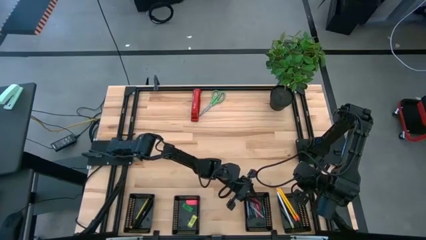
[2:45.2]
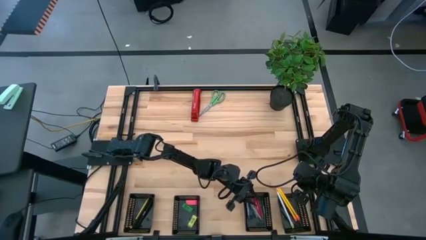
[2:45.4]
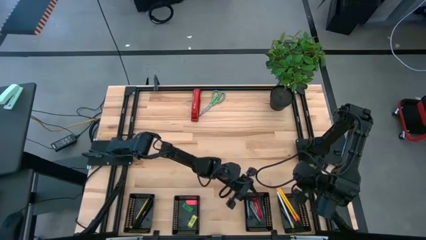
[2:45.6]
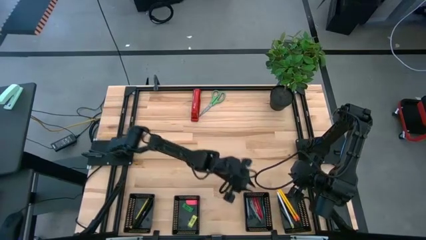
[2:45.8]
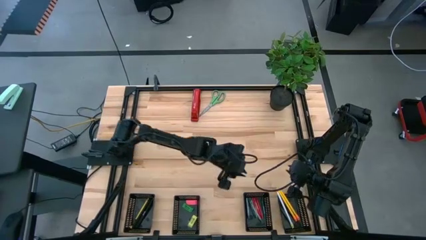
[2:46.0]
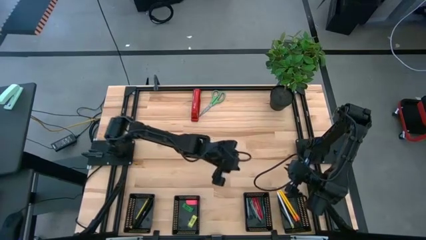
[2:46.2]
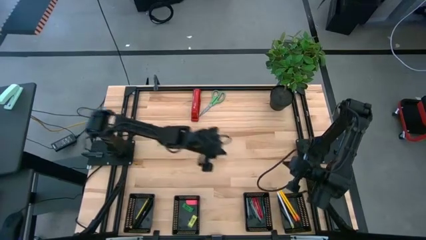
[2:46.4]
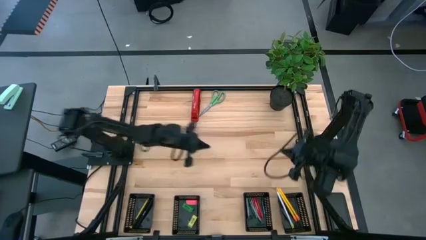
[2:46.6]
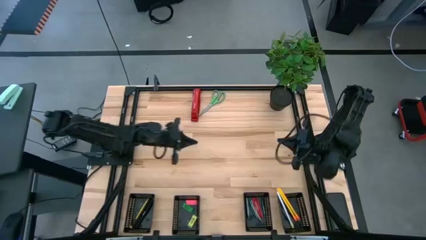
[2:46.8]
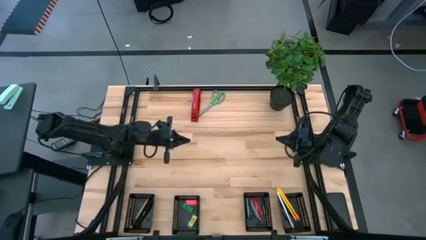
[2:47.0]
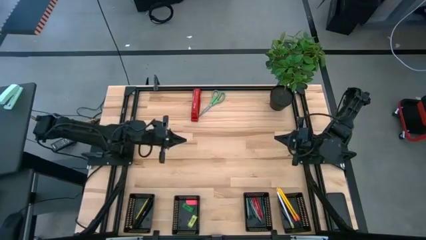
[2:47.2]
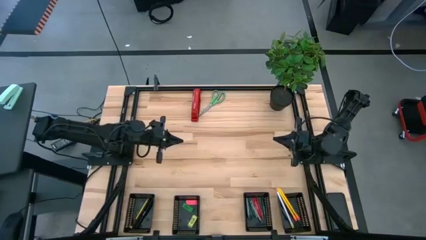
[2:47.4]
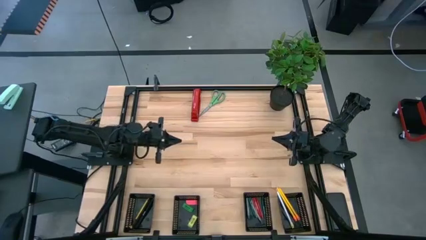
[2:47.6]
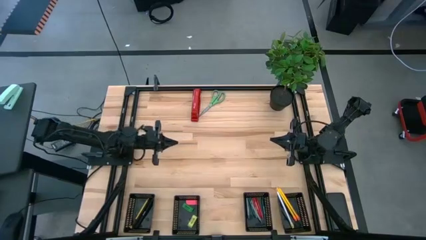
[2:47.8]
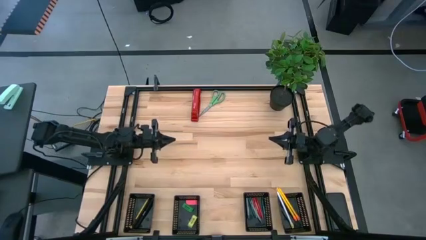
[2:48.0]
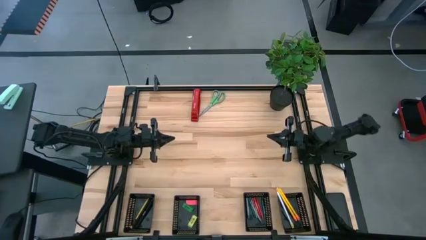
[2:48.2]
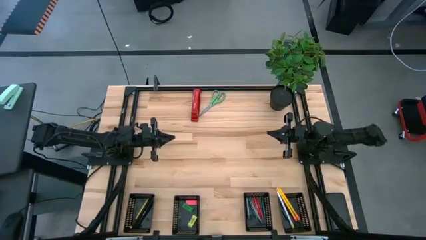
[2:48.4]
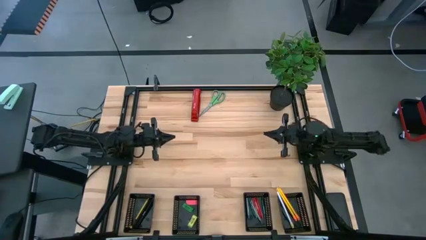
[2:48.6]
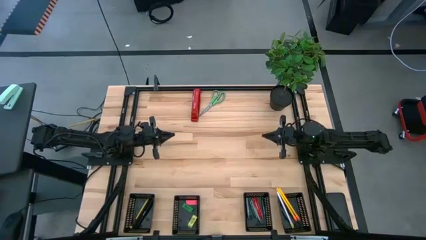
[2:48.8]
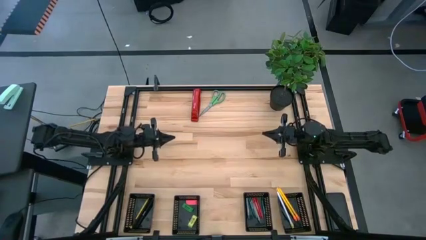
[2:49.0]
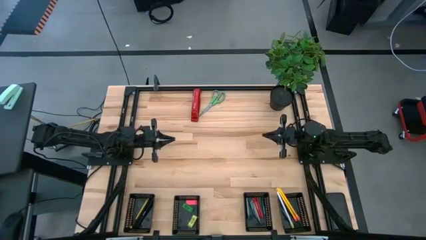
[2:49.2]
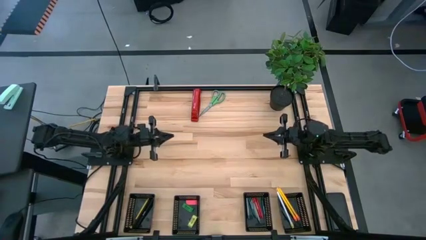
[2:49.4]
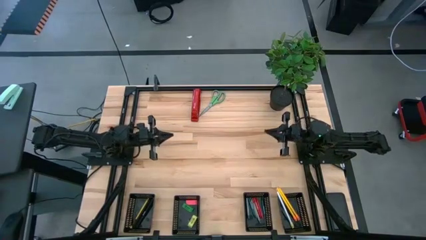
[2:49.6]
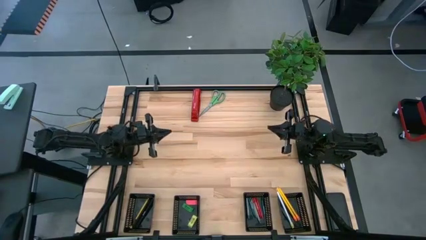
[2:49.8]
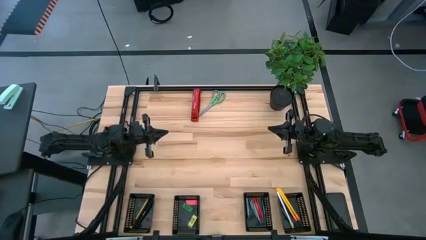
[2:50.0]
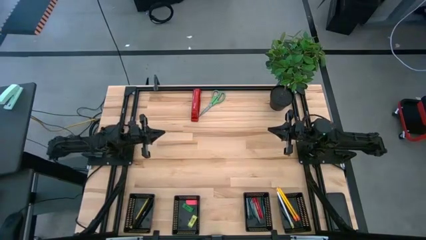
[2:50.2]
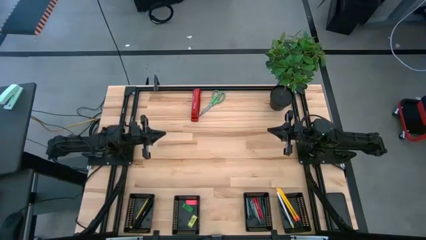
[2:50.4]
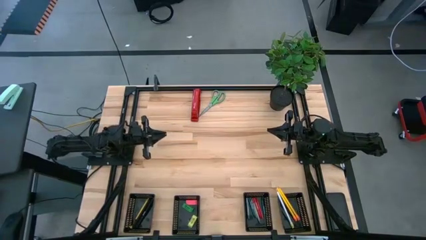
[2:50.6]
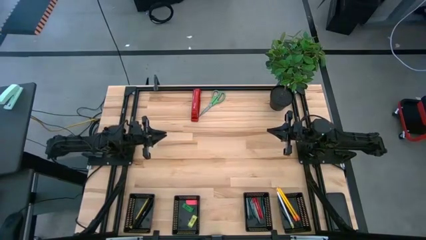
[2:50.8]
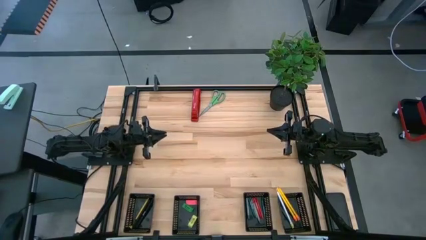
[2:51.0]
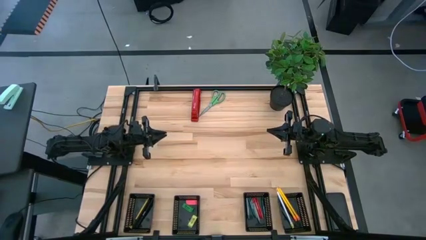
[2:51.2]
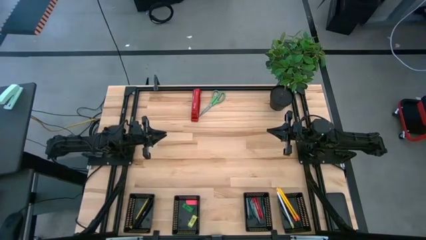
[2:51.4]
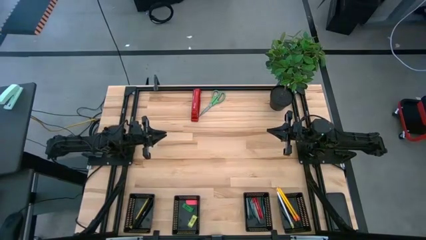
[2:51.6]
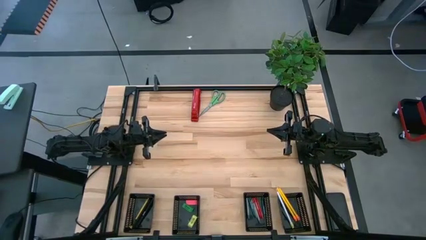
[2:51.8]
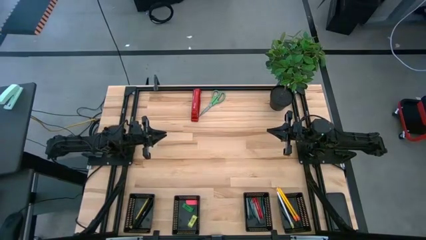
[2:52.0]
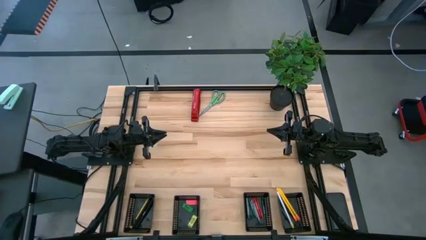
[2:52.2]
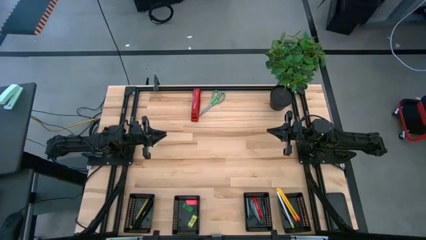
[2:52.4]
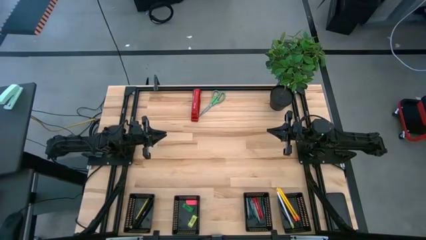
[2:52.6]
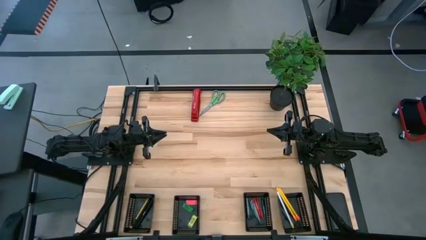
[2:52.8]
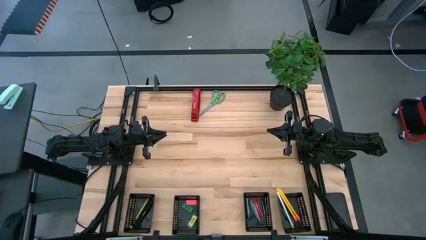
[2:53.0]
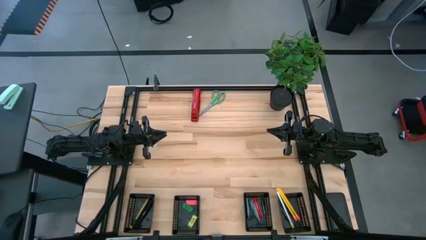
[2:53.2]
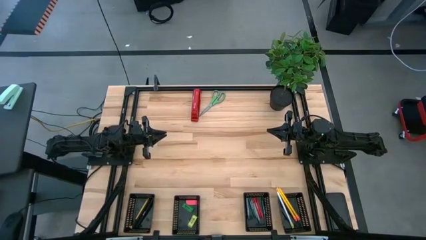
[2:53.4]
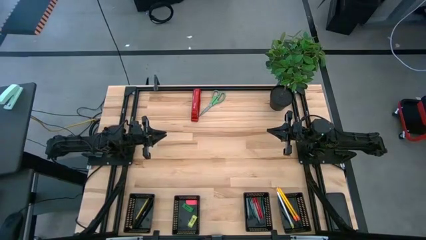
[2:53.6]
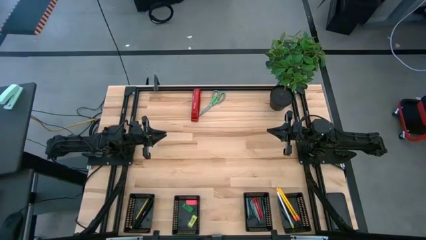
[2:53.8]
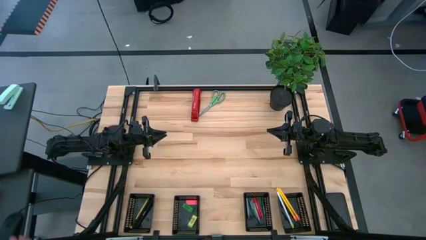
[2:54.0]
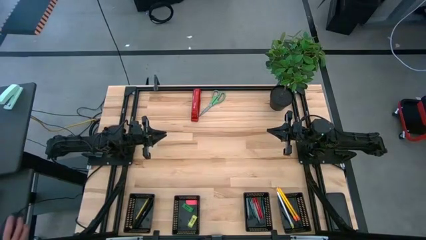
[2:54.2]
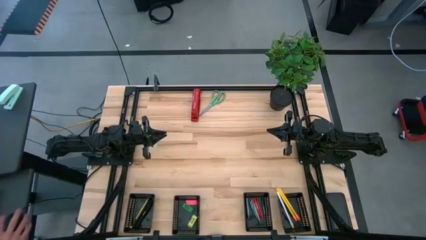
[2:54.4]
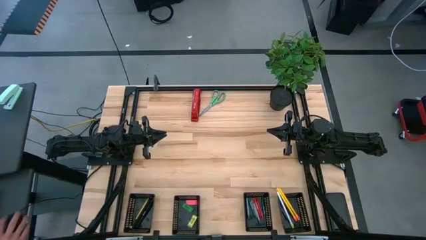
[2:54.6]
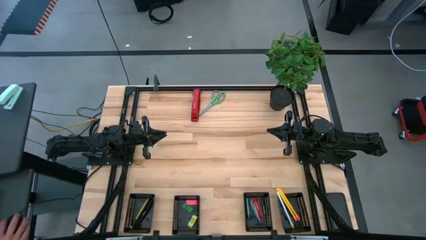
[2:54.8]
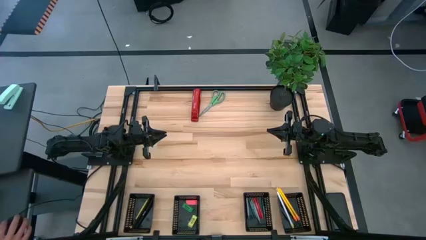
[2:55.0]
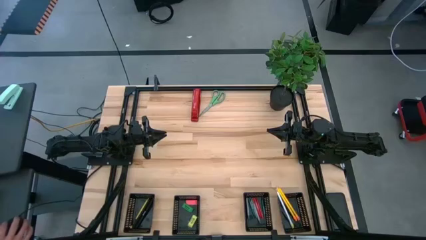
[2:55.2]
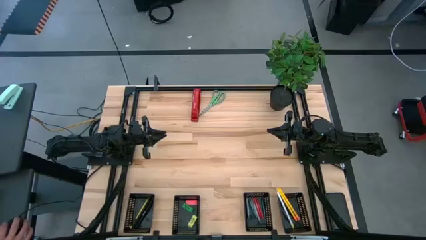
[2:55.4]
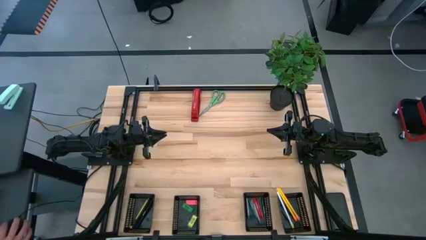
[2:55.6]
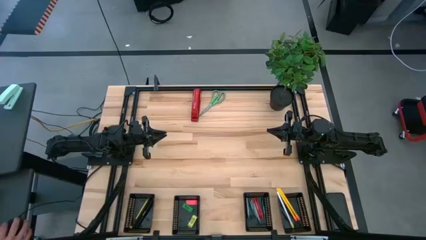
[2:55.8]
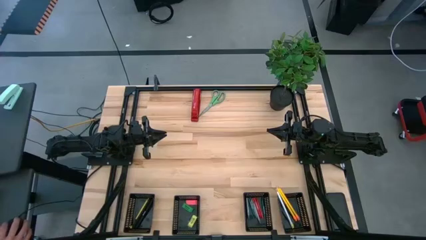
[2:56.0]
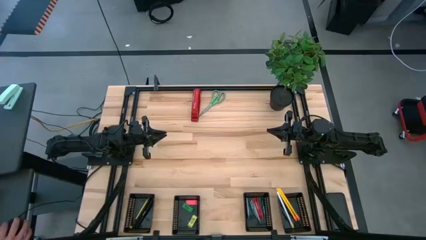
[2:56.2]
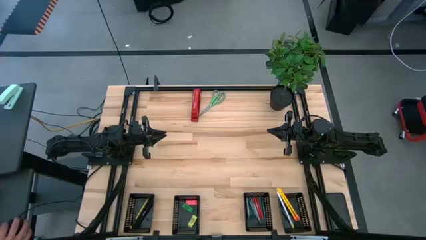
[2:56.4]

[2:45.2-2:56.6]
Task: Sort crayons/erasers/pens/pencils in bins
Return to Home Position

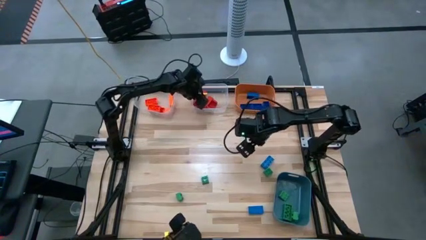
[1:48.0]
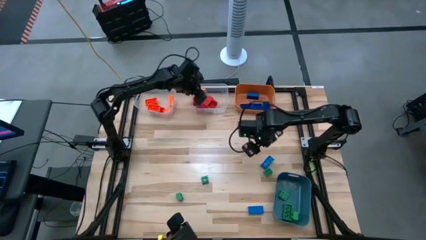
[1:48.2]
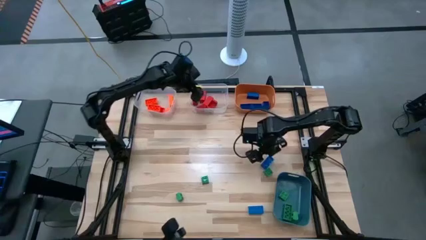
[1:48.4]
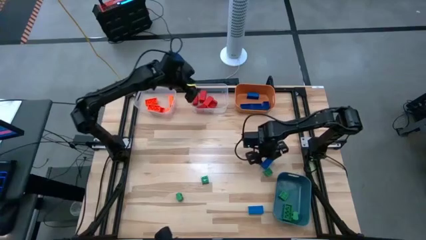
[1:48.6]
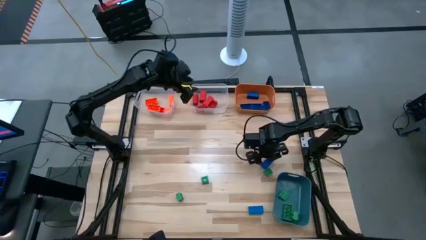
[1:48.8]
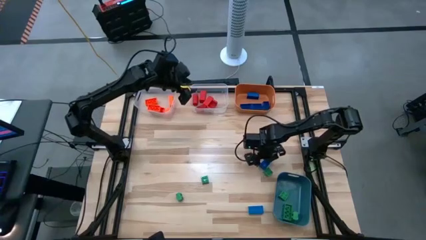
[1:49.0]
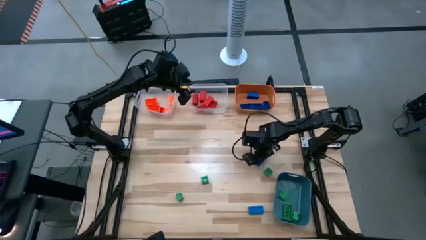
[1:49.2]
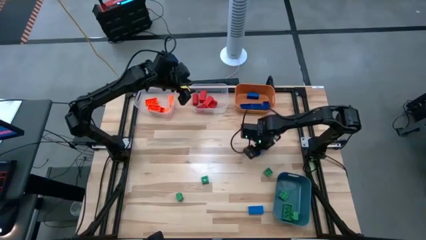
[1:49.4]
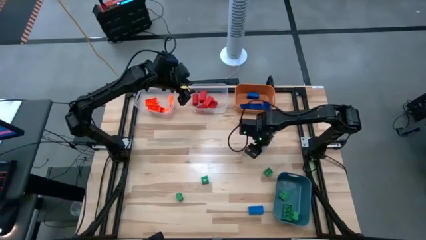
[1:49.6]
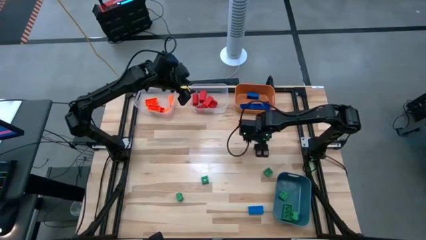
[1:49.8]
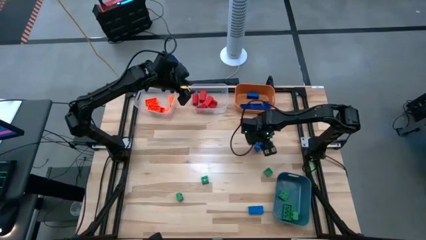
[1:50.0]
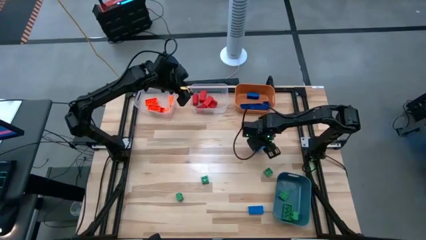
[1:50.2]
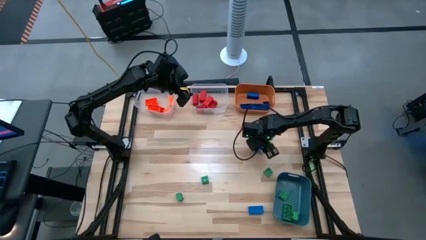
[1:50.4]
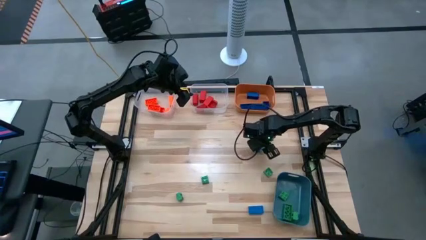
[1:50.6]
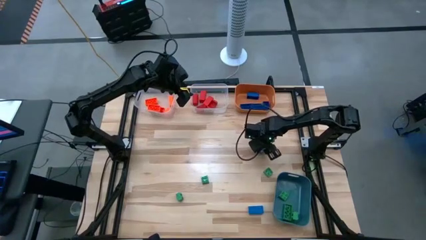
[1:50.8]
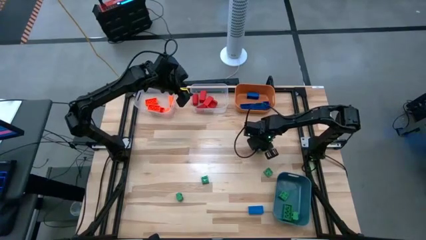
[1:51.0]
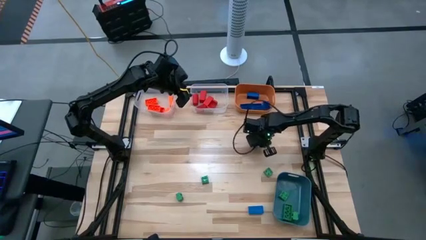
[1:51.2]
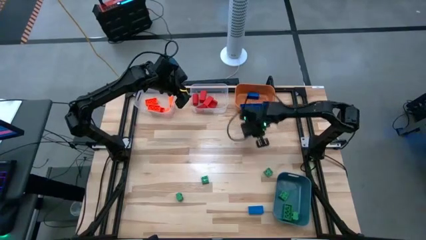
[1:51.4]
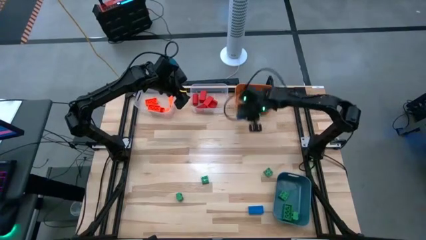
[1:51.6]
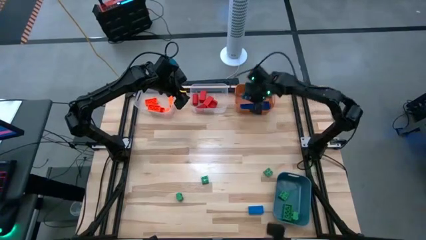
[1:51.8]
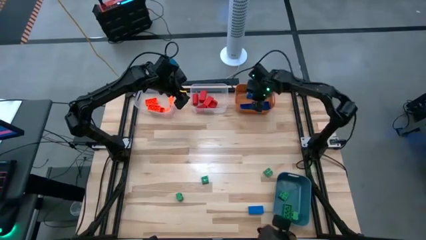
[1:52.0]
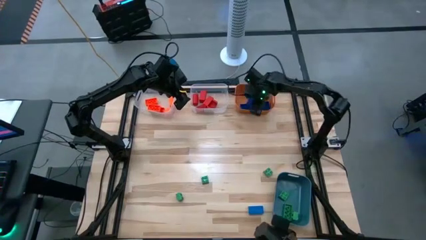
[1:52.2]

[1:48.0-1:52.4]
Task: Sort blocks
Put the blue game piece into the orange bin
